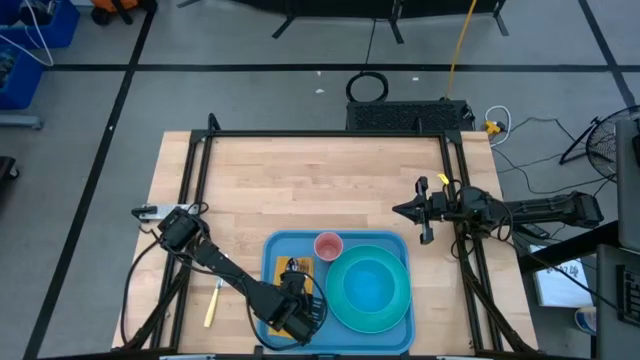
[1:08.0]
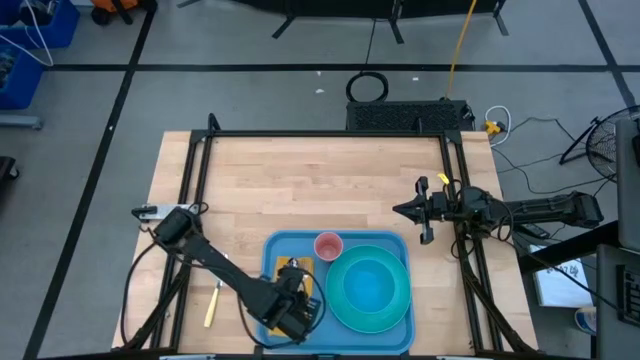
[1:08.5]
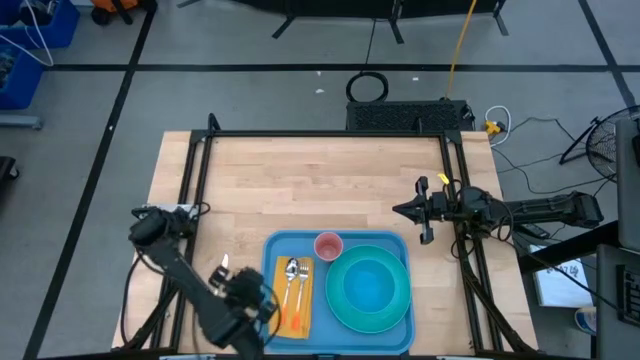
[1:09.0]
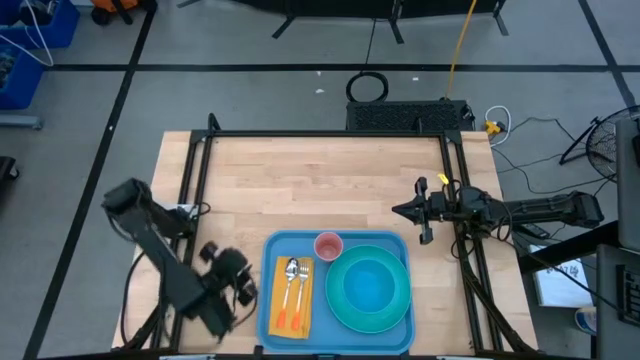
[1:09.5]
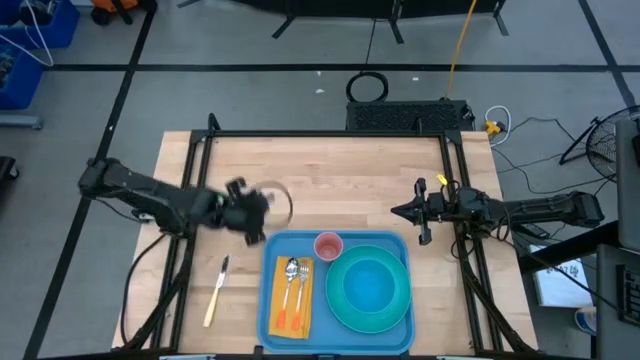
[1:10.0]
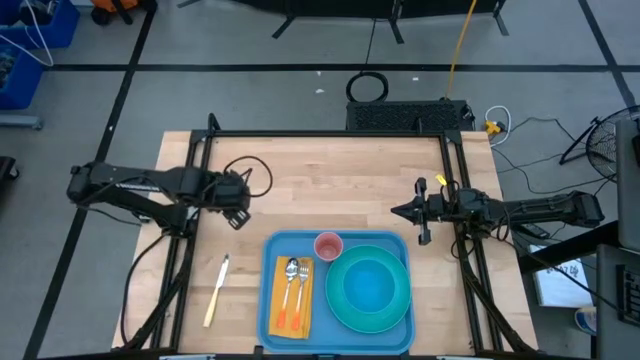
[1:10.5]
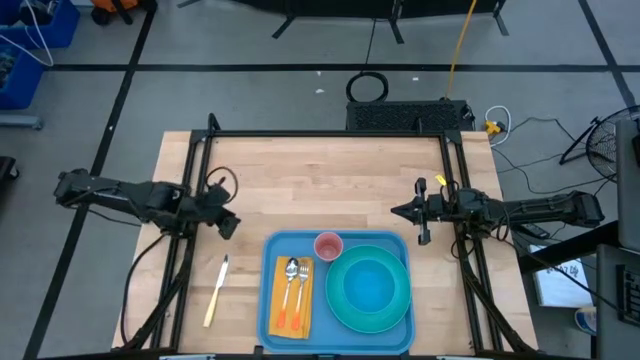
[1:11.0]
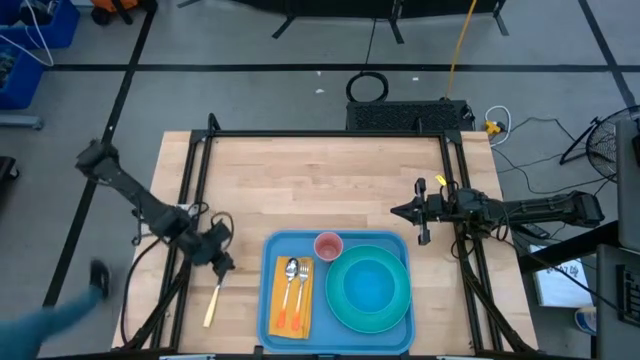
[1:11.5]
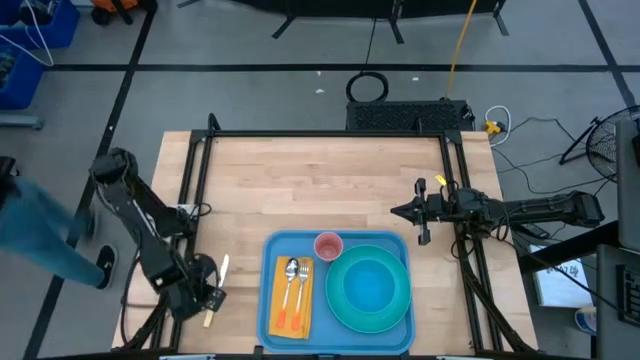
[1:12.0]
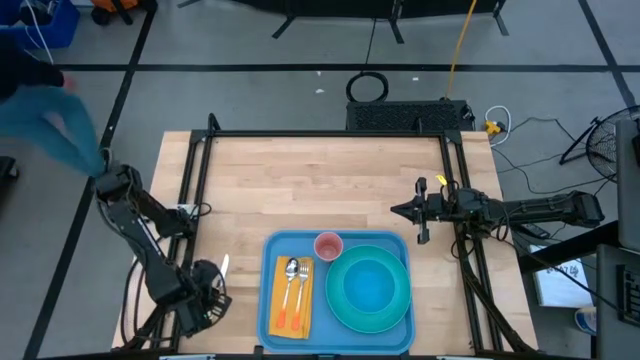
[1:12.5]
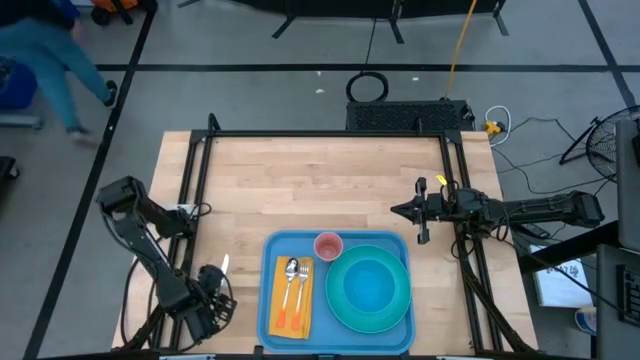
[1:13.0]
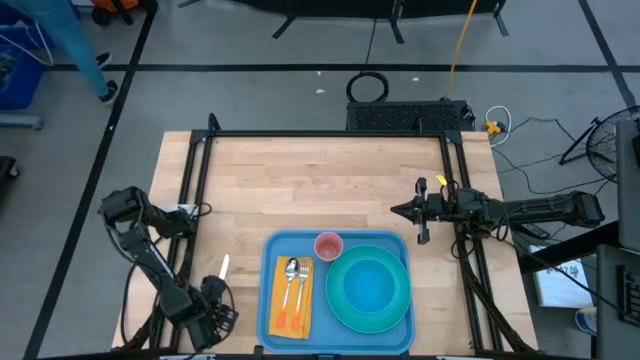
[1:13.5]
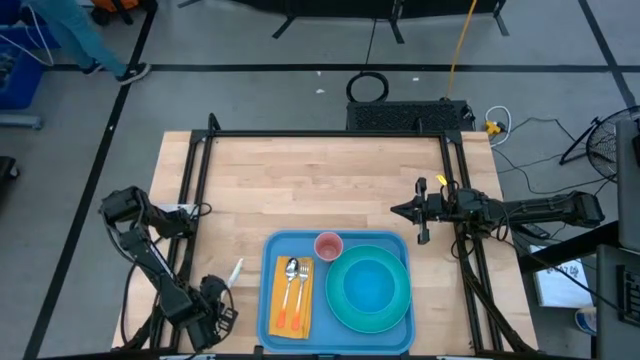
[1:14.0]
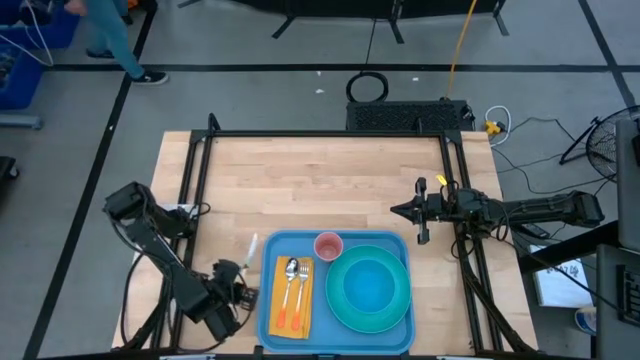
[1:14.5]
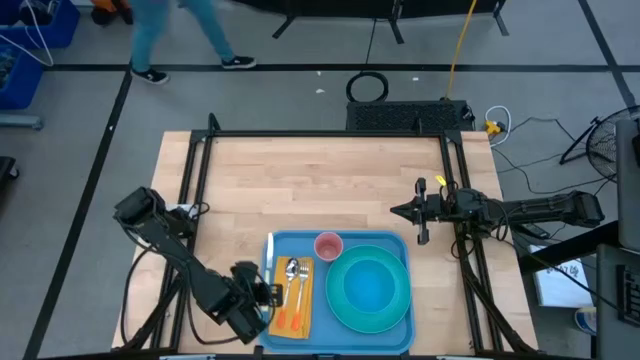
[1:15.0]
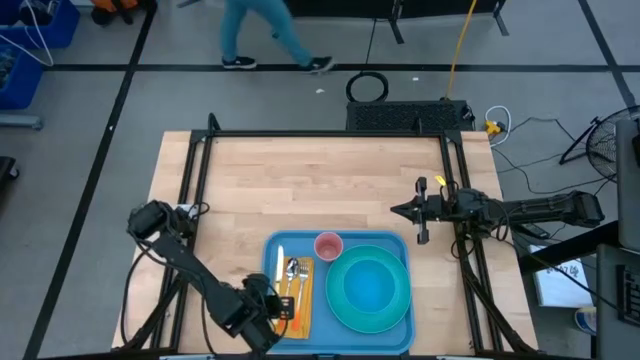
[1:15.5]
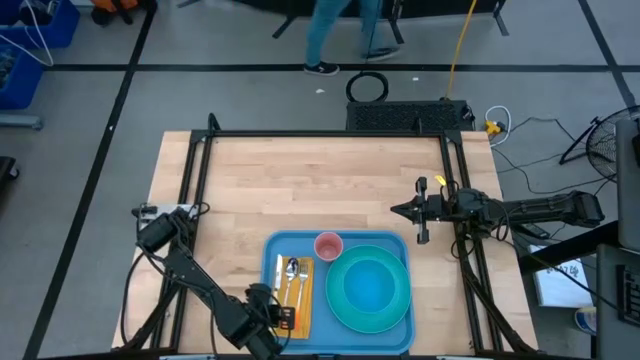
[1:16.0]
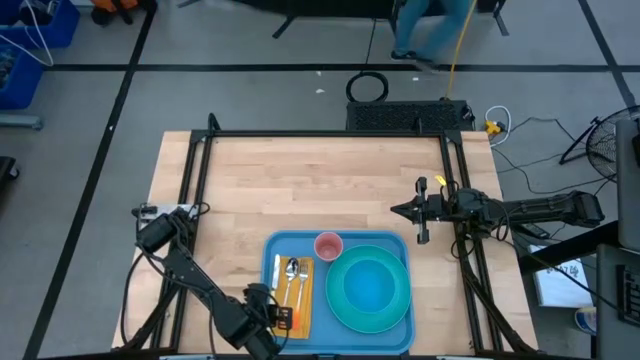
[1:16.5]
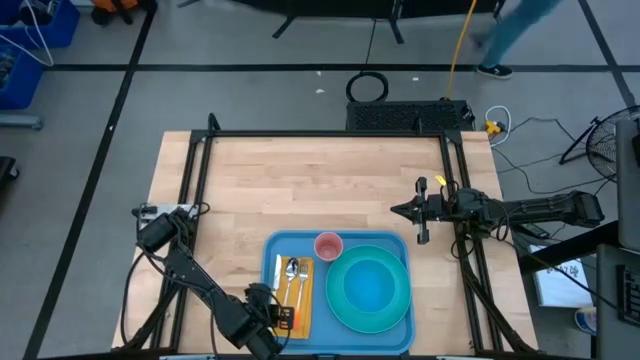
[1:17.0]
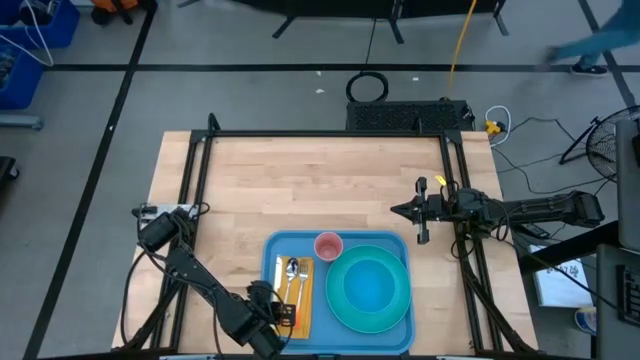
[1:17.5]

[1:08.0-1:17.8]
Task: Set up tray
Put the yellow knife to the left of the orange spoon on the yellow table napkin on the blue tray

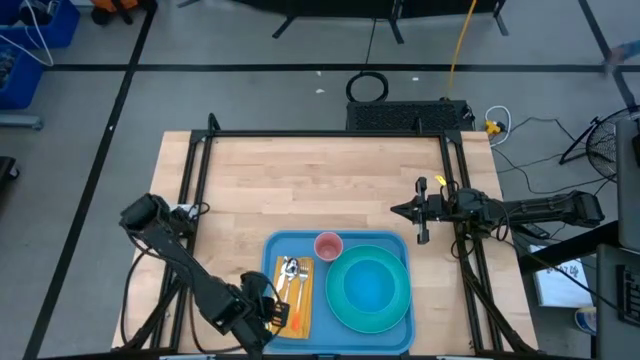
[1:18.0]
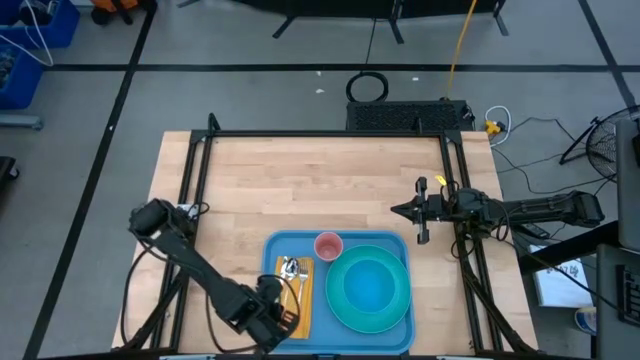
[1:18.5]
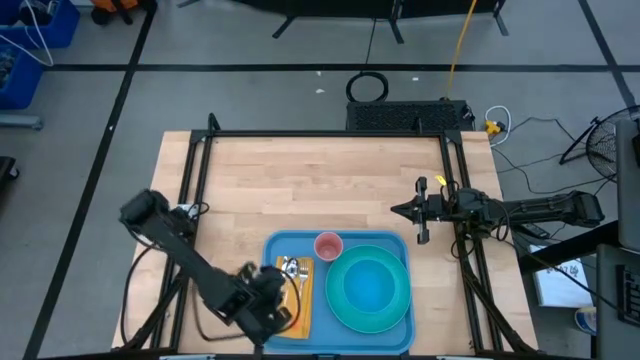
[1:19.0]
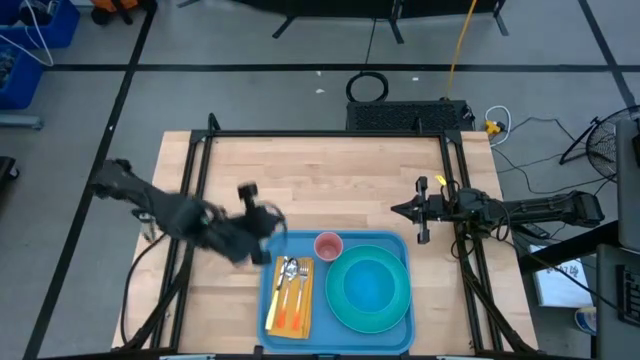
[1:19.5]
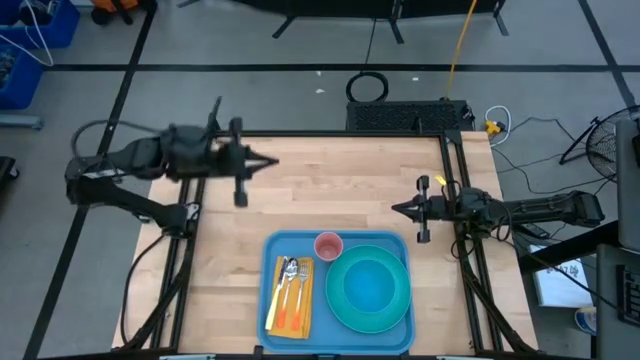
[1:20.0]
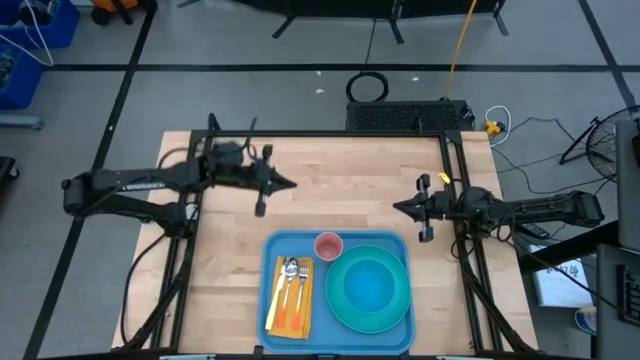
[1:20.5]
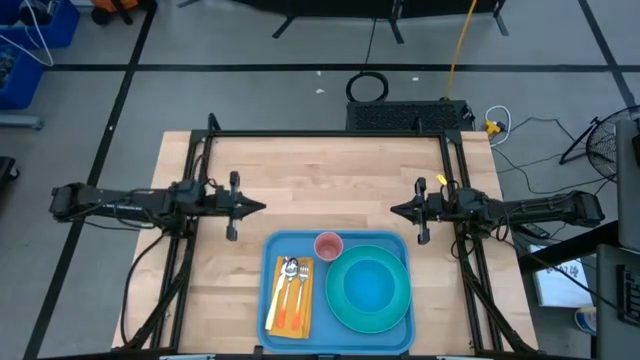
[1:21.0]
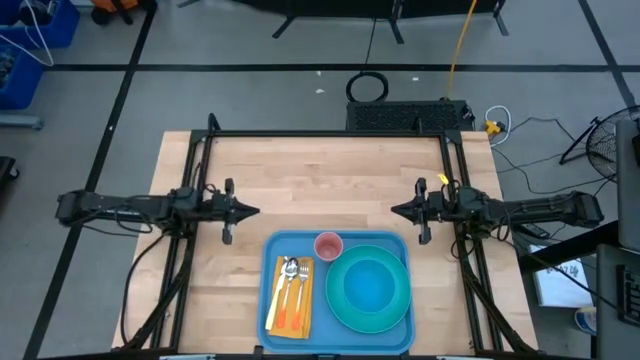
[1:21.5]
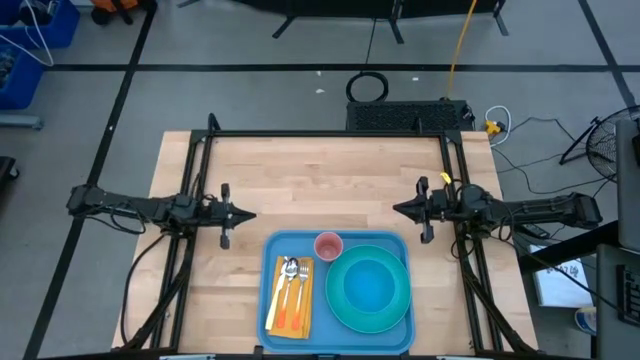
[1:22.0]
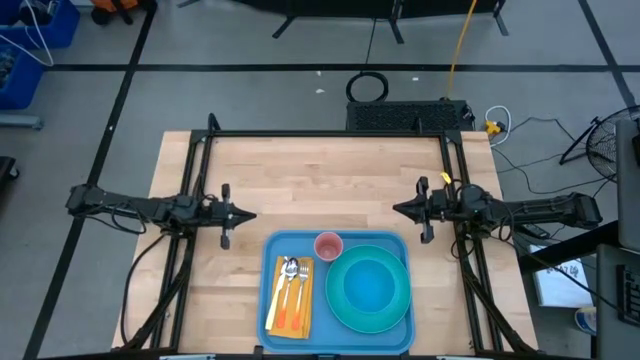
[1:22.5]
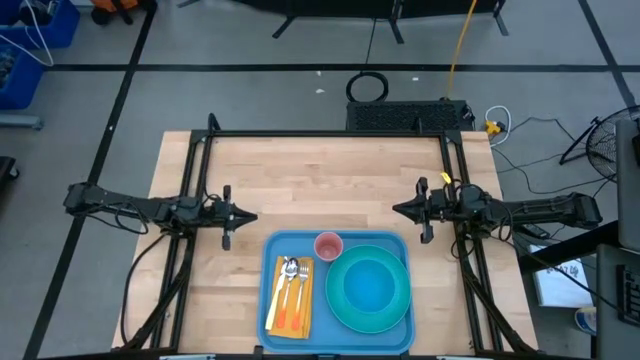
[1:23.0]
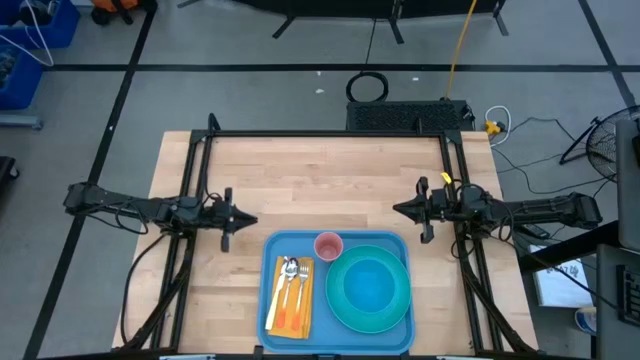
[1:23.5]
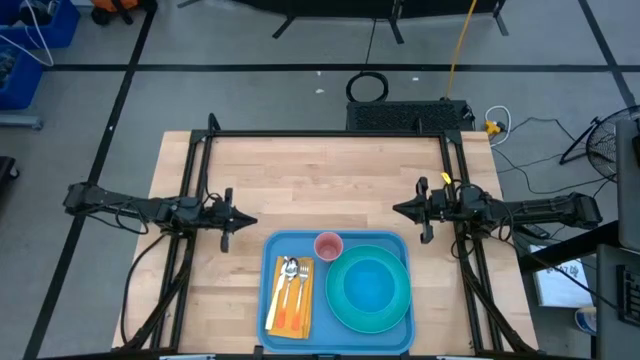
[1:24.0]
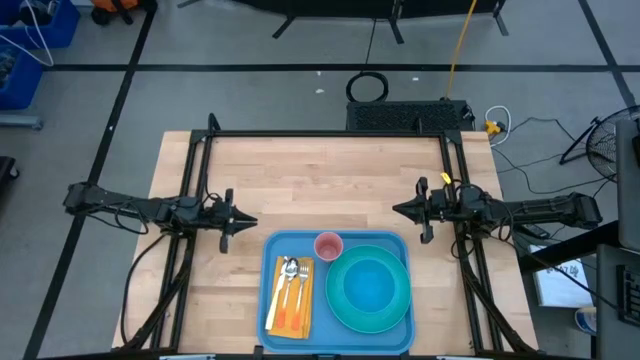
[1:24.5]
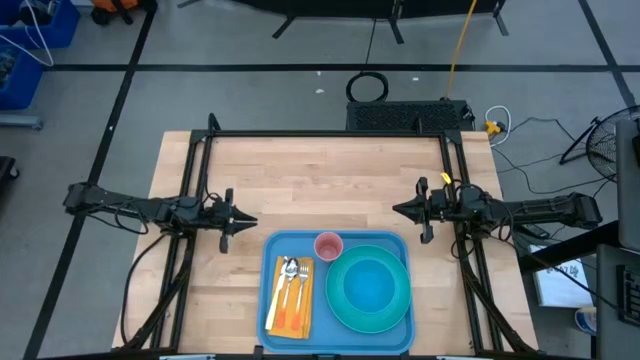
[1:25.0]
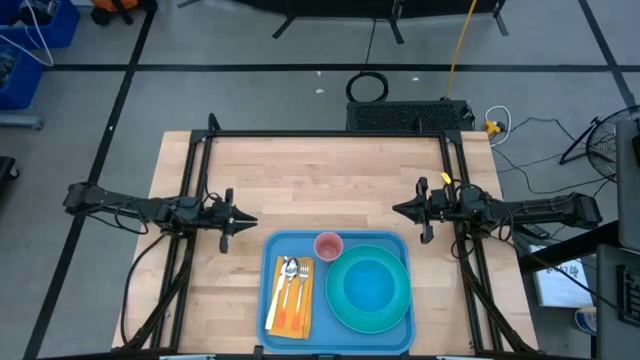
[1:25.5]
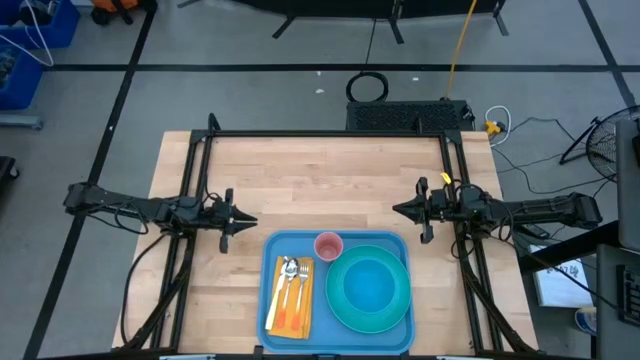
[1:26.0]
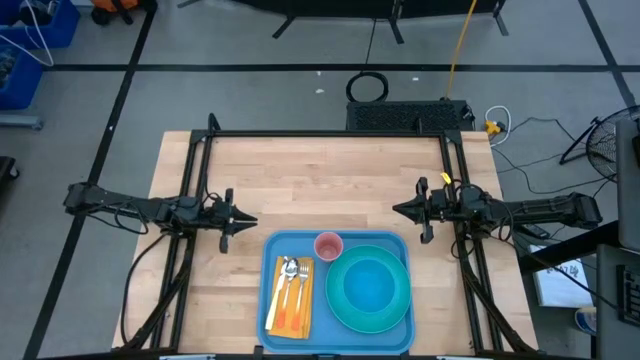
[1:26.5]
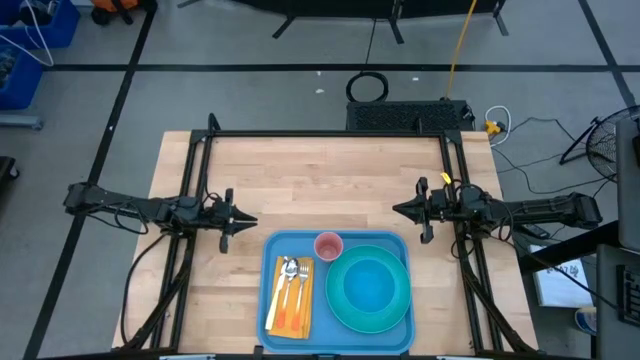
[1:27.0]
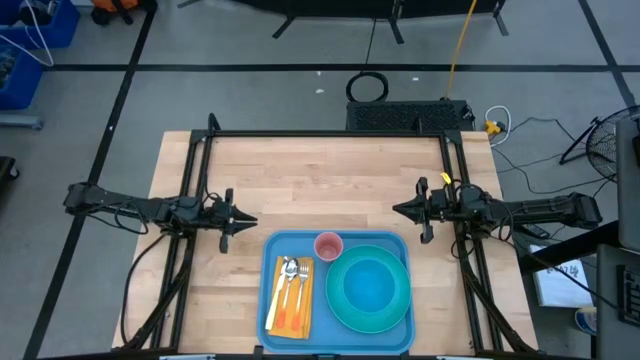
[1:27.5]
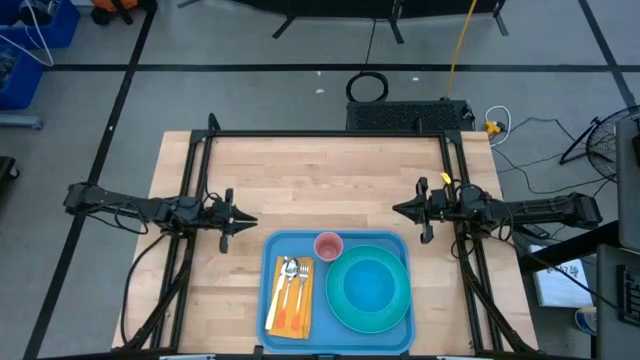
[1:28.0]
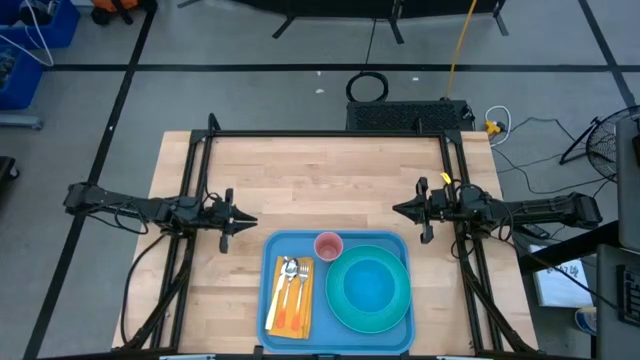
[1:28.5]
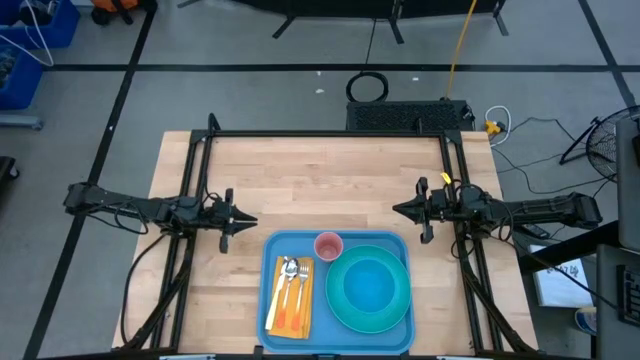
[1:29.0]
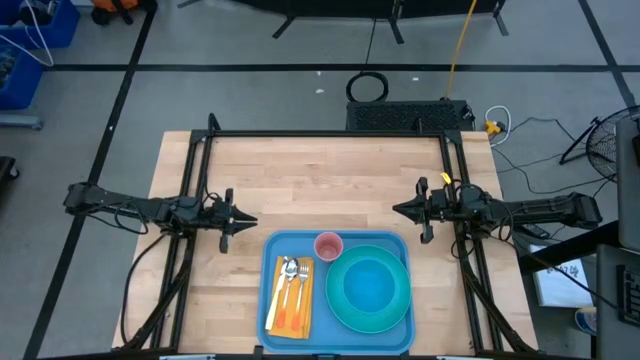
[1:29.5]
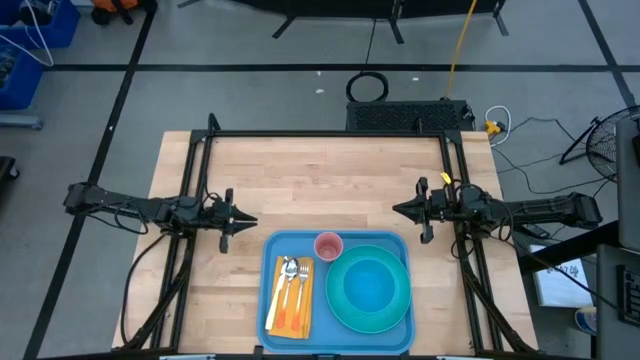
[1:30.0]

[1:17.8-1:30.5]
Return to Home Position
